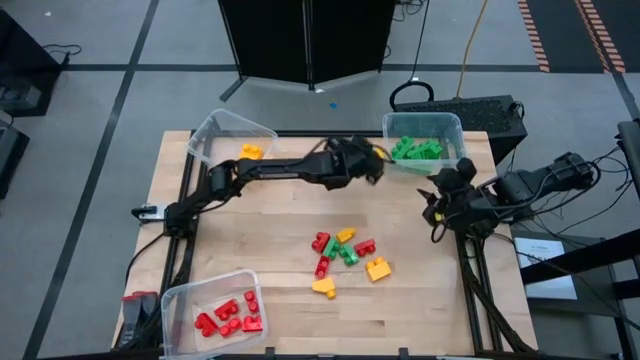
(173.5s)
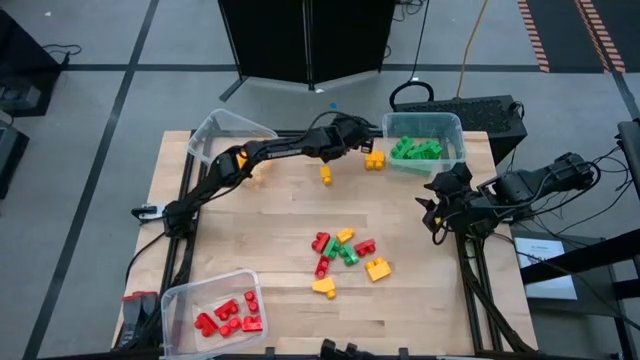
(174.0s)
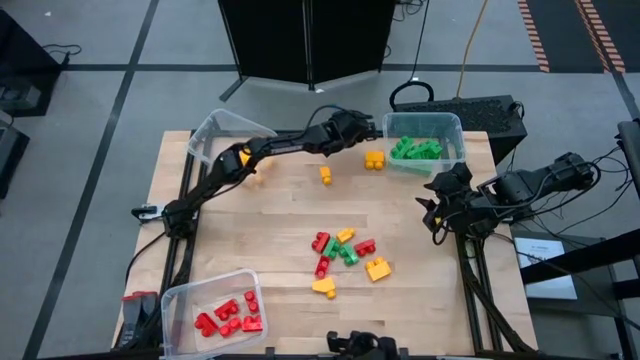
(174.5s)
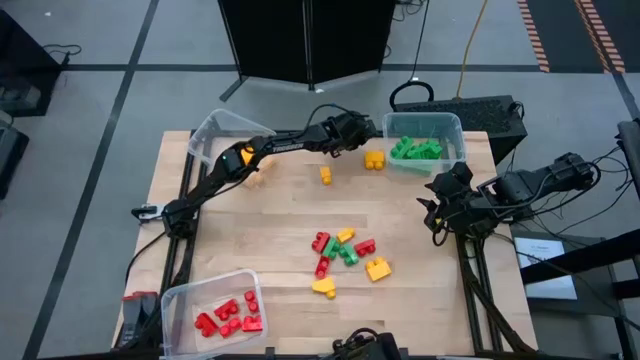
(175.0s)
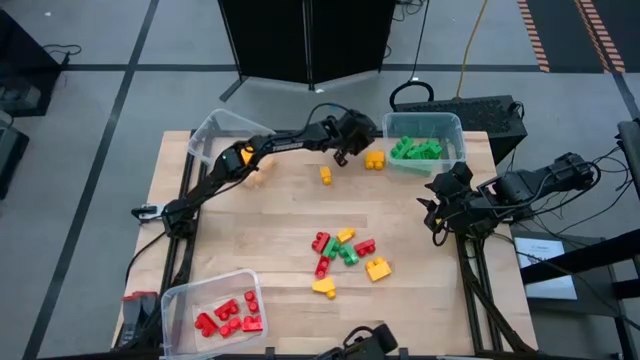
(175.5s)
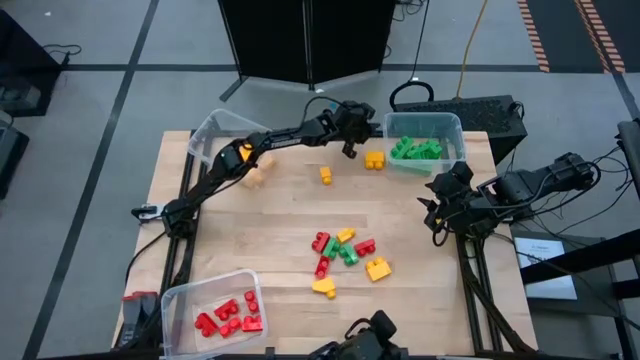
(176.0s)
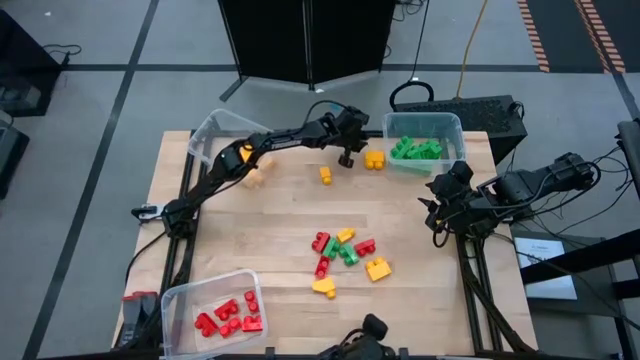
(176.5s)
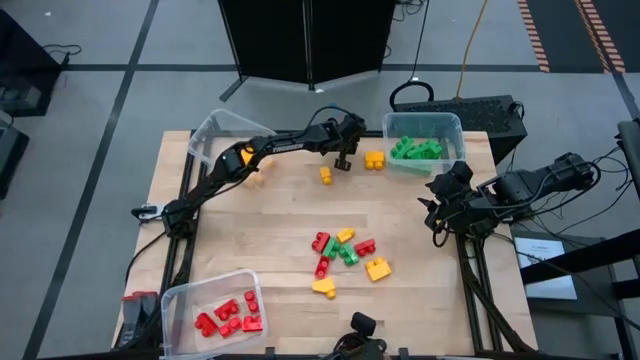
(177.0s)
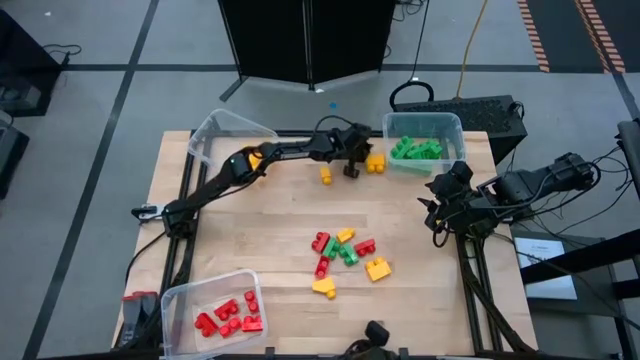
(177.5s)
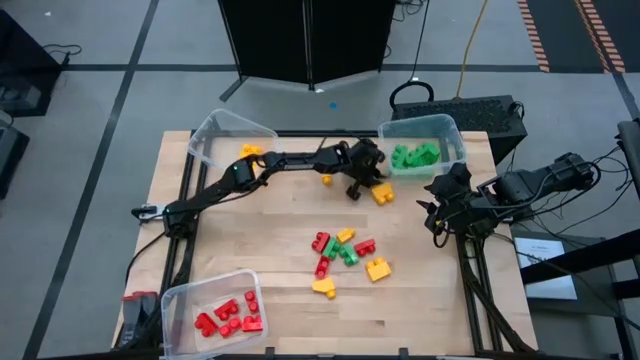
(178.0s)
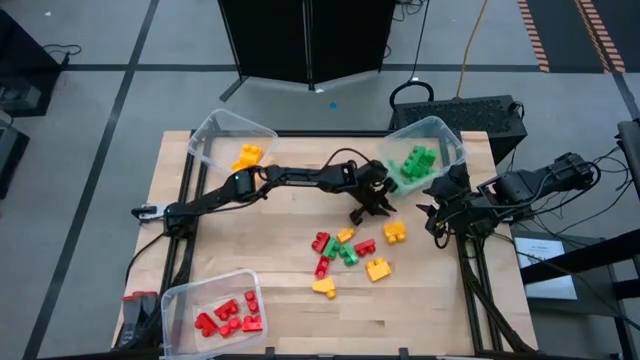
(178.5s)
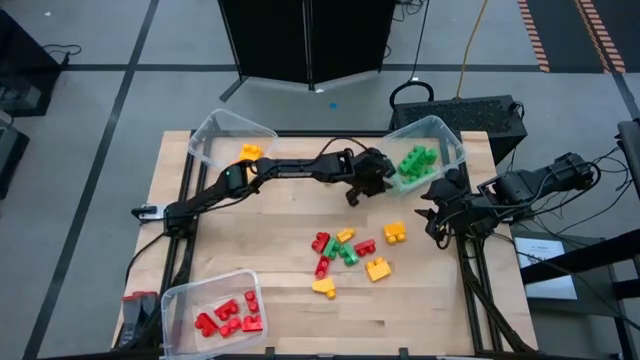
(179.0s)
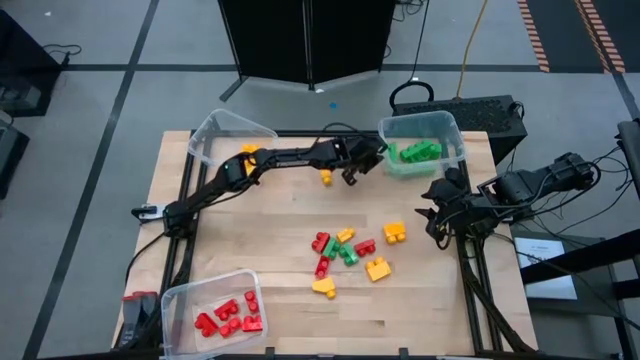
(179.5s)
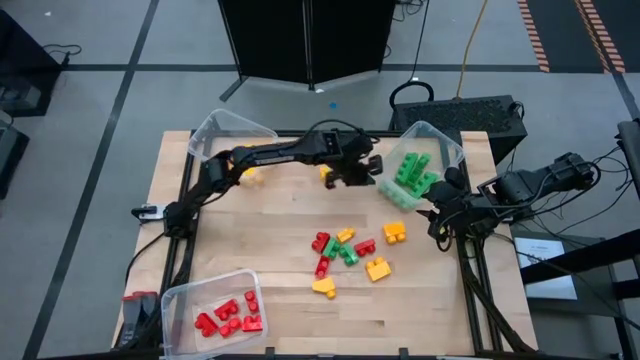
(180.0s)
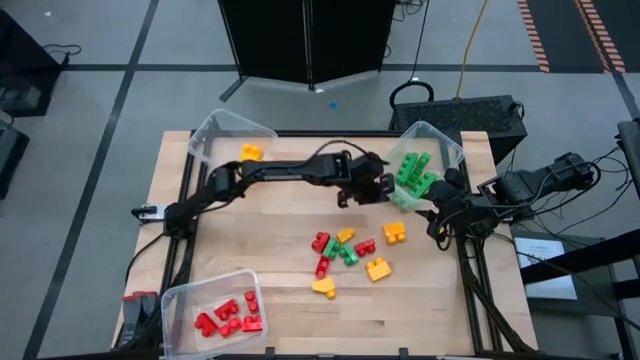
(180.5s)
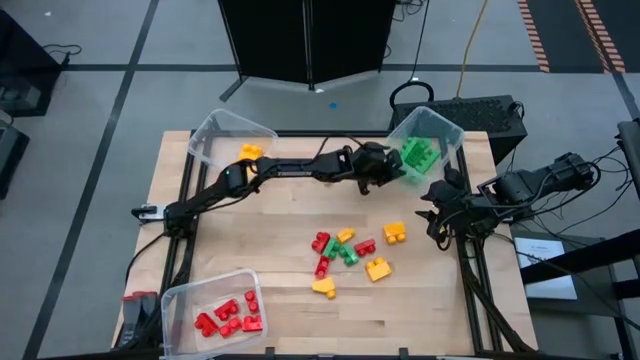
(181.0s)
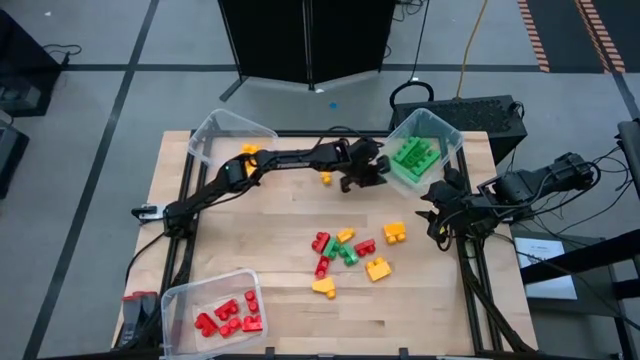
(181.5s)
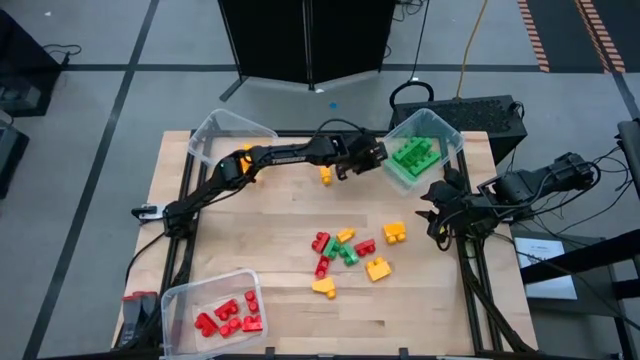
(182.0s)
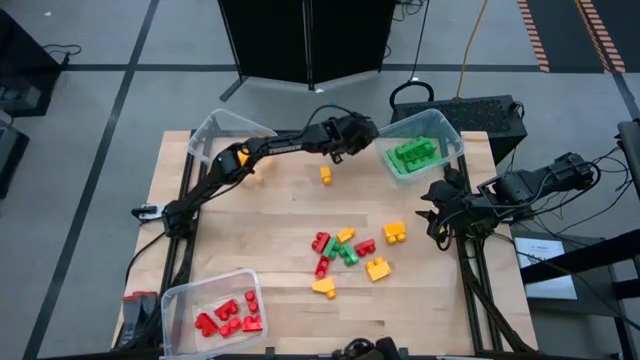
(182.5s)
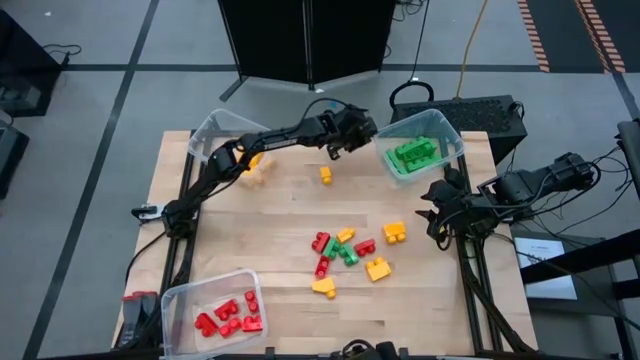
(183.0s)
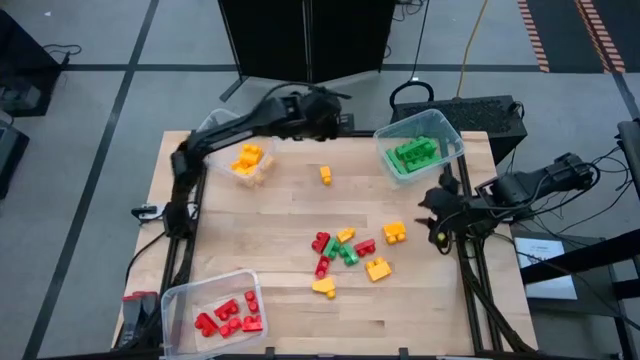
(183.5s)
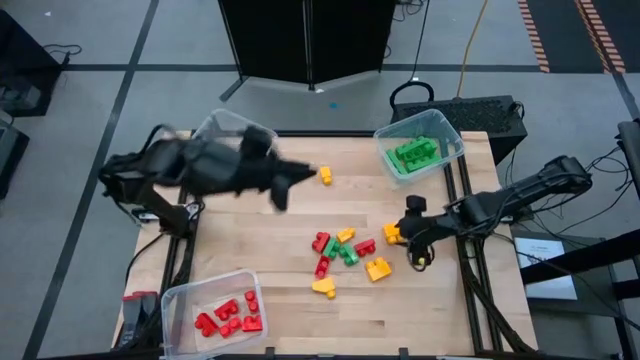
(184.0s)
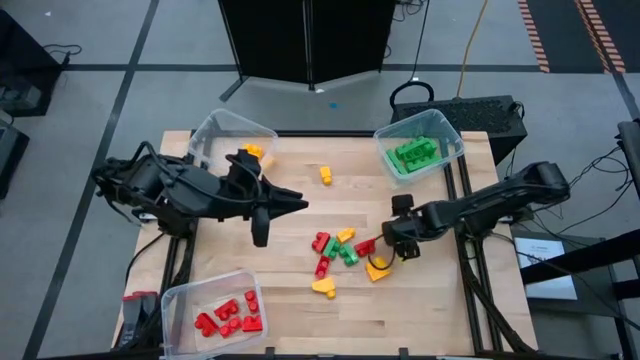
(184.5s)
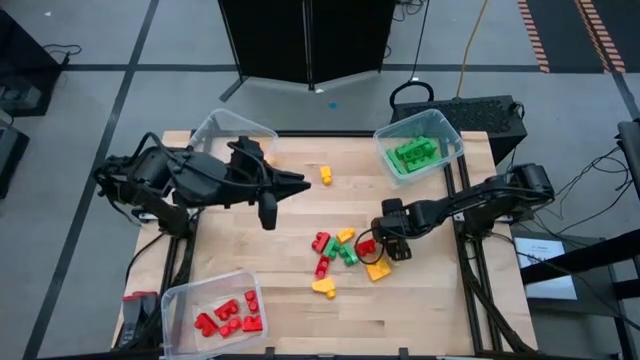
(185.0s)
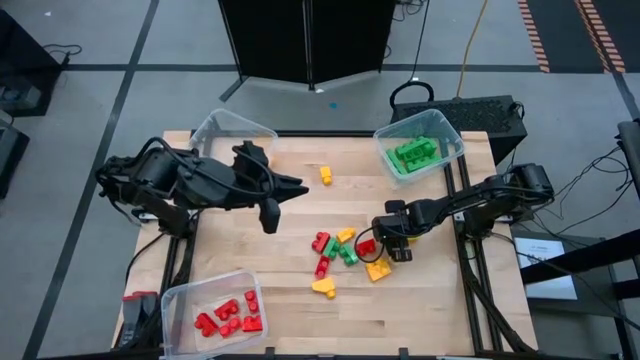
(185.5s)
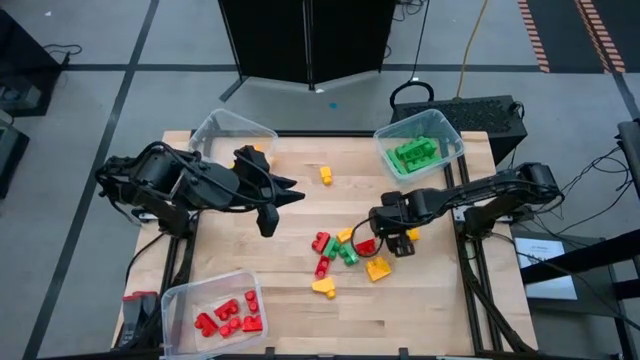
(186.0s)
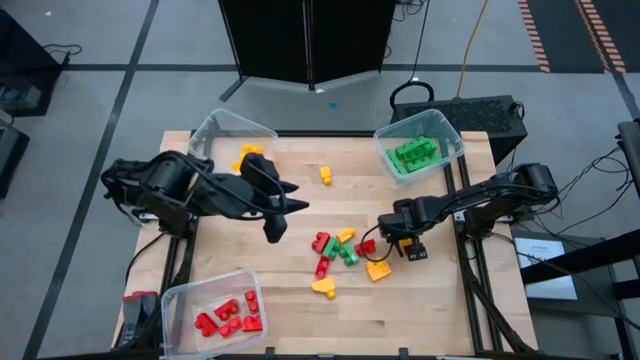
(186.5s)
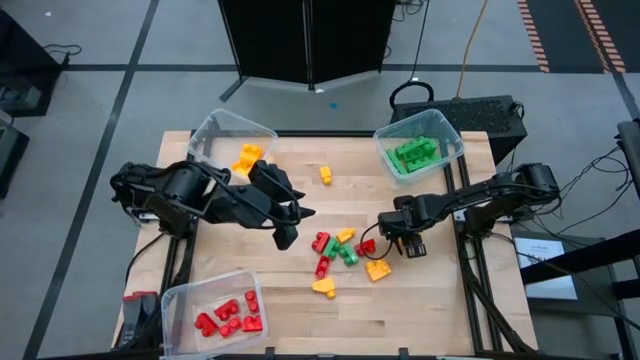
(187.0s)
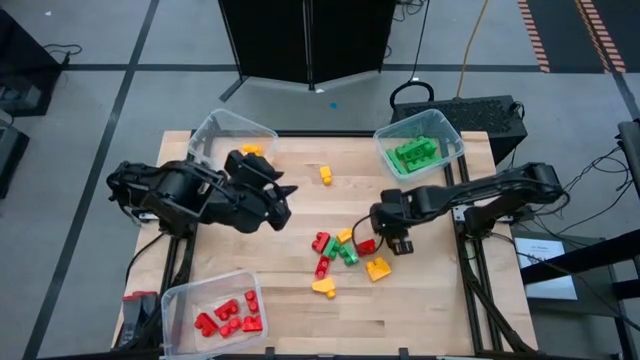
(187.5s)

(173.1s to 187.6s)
Task: Sort blocks
Put the yellow game piece into the top left transparent bin

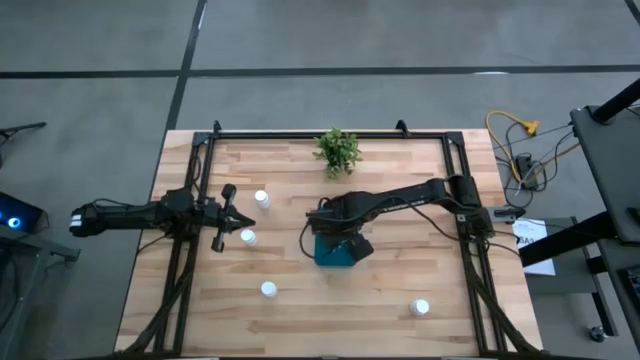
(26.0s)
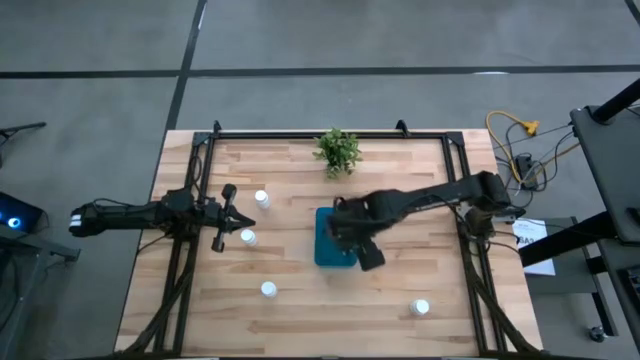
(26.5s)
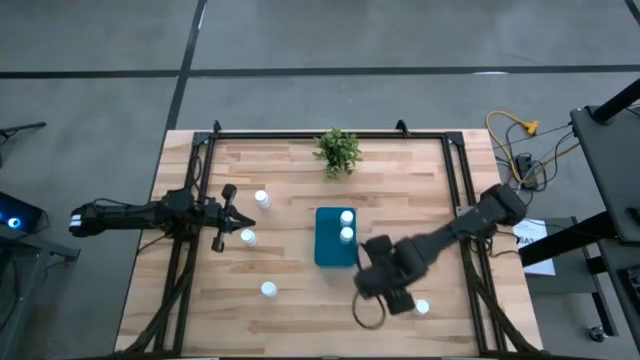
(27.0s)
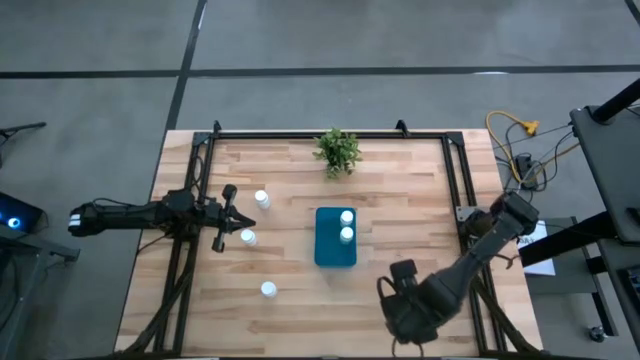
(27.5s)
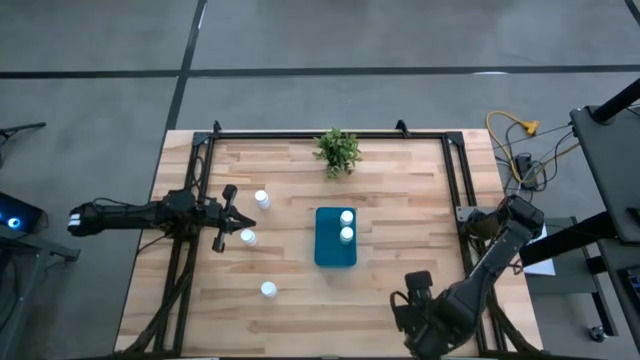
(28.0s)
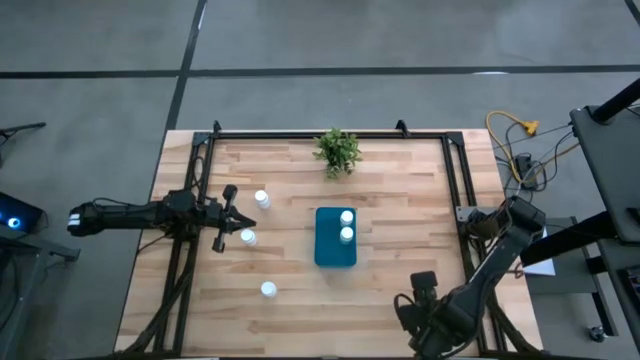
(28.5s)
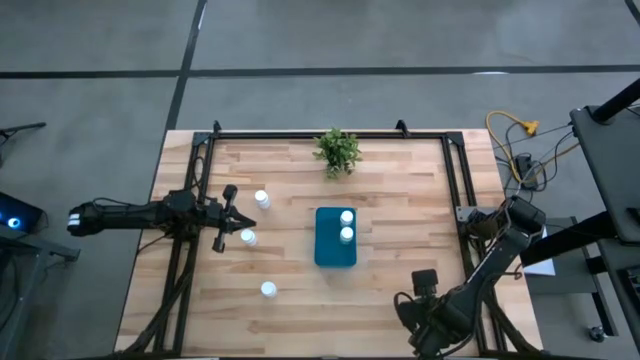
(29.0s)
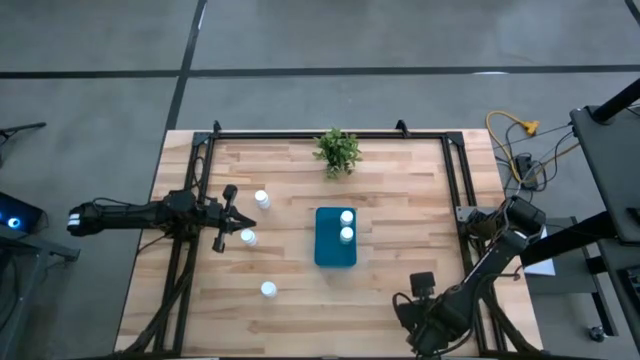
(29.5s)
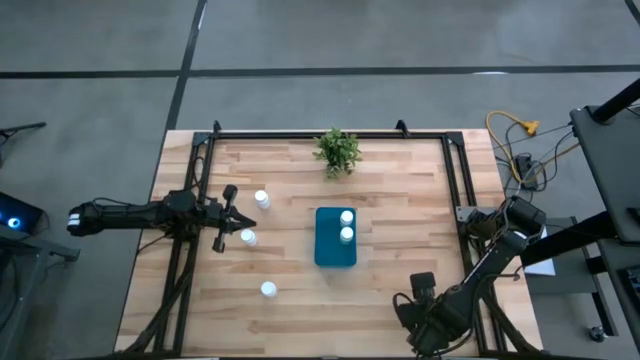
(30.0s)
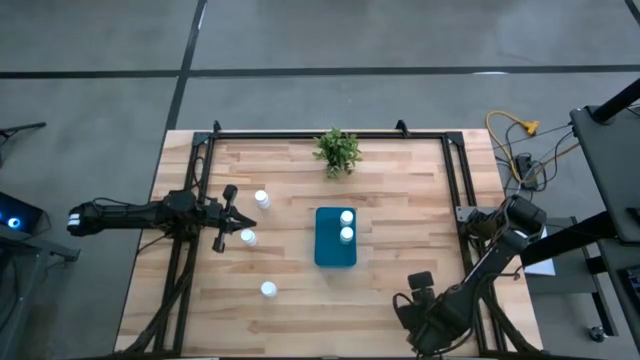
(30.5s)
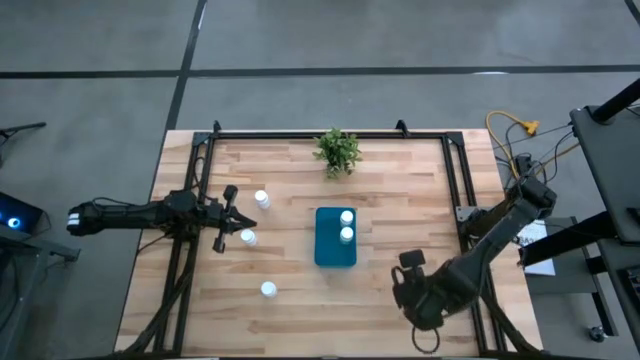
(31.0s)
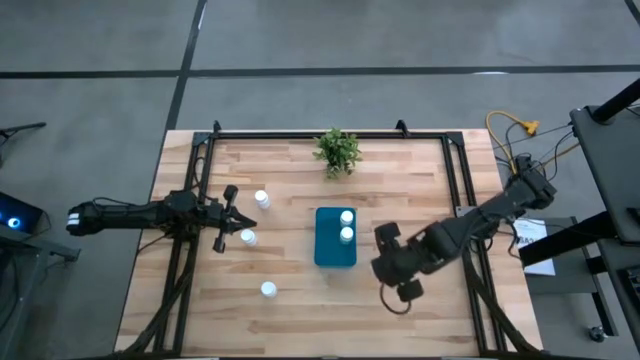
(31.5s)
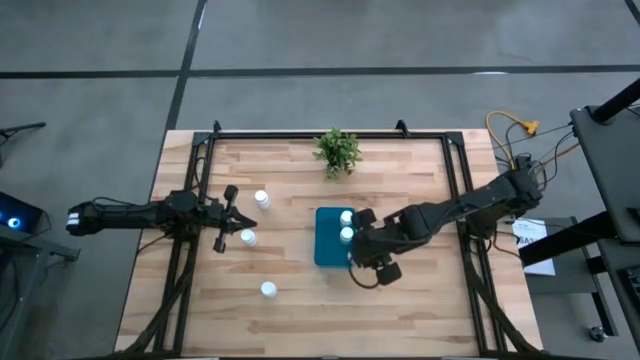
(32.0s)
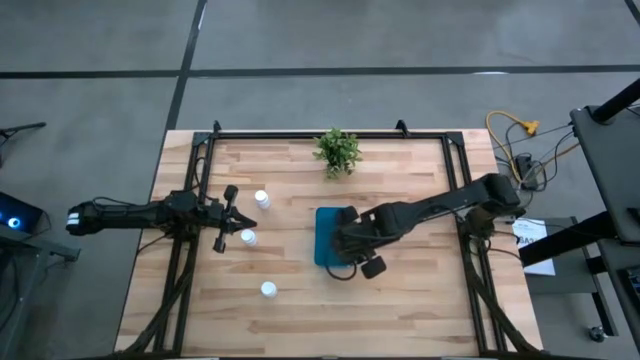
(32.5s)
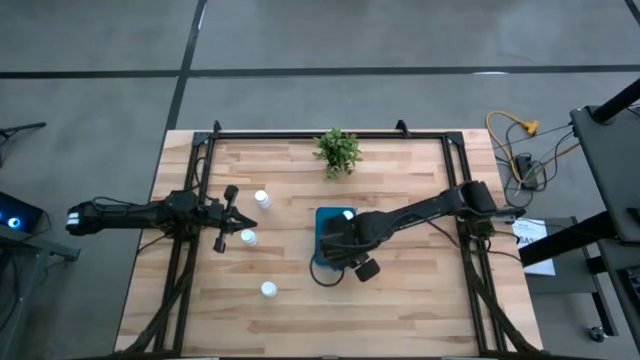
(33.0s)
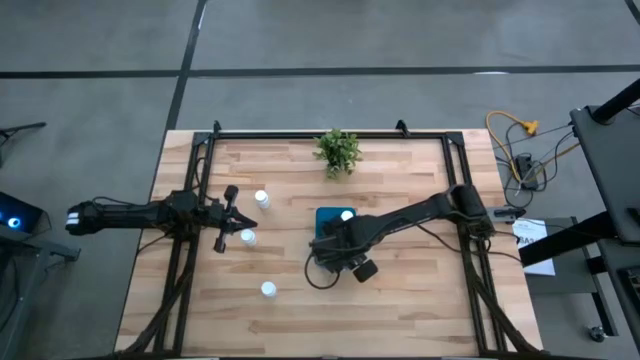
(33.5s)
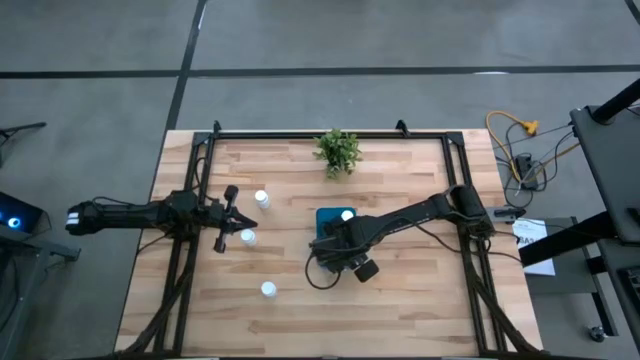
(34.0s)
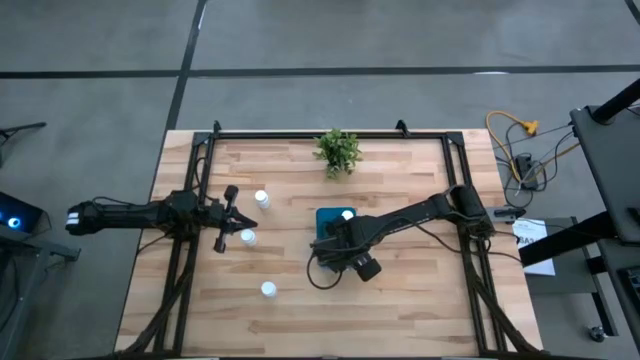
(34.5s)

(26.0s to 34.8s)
Task: Pick and place pill bottles into a basket
Put the white medicine bottle into the blue bin
